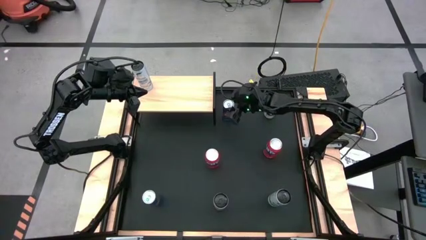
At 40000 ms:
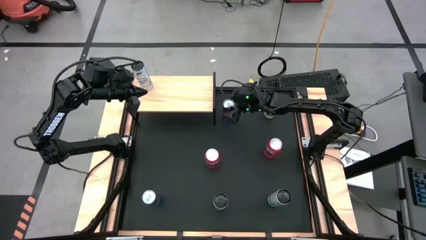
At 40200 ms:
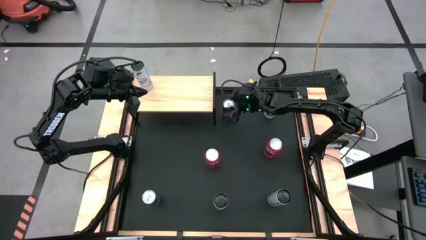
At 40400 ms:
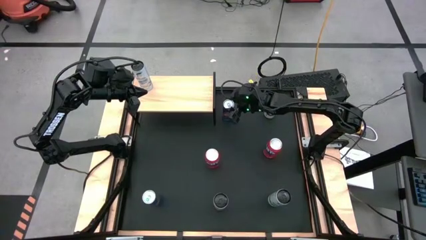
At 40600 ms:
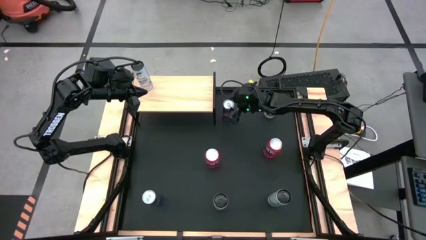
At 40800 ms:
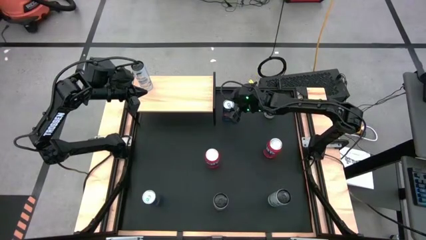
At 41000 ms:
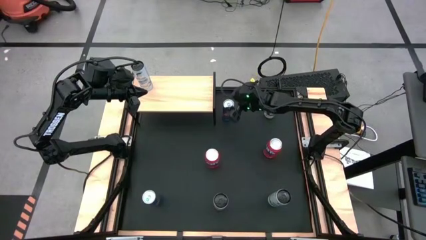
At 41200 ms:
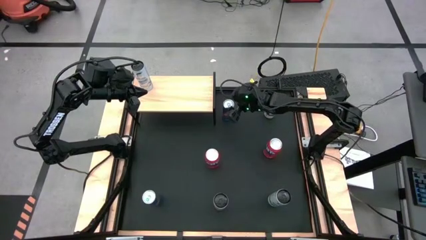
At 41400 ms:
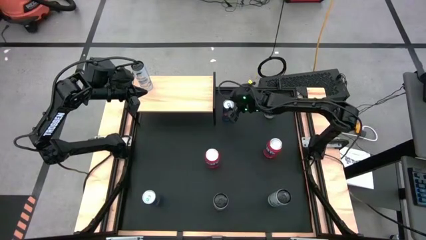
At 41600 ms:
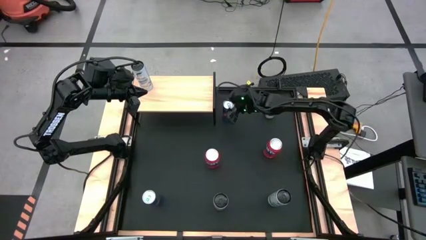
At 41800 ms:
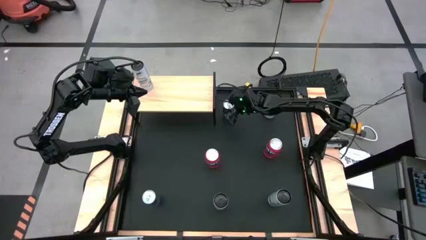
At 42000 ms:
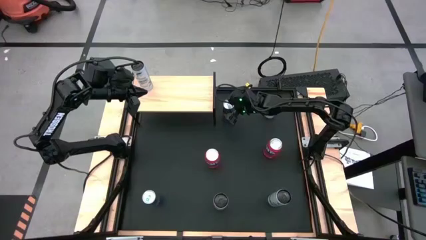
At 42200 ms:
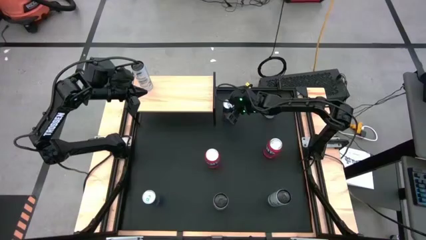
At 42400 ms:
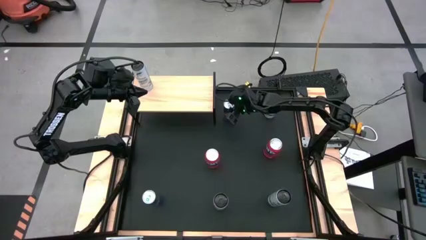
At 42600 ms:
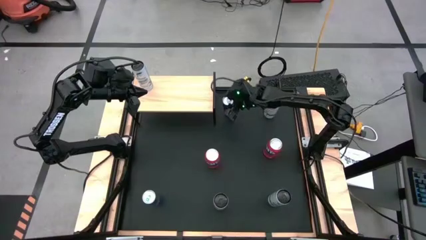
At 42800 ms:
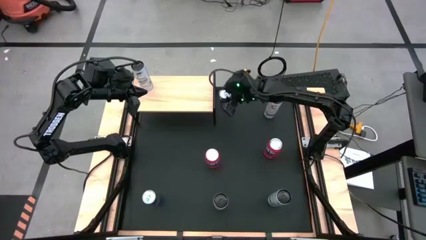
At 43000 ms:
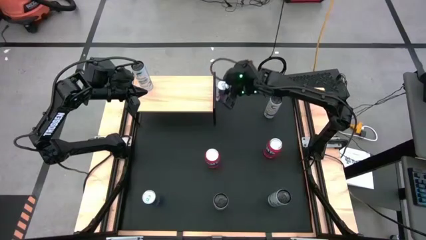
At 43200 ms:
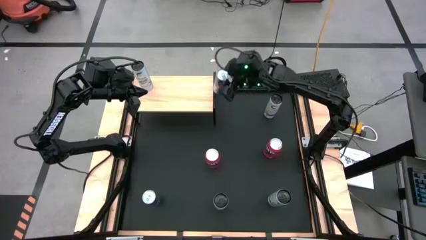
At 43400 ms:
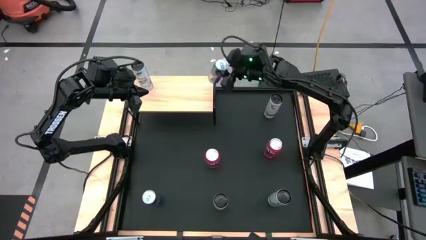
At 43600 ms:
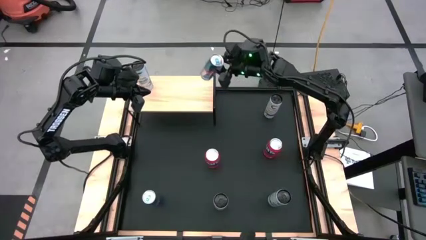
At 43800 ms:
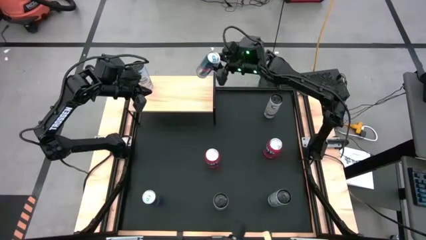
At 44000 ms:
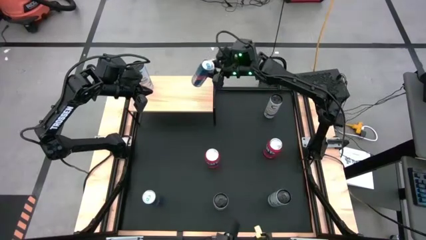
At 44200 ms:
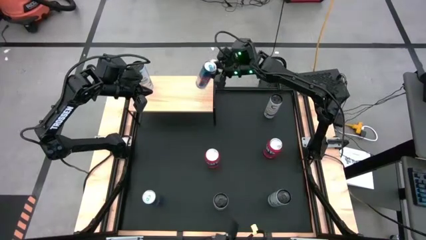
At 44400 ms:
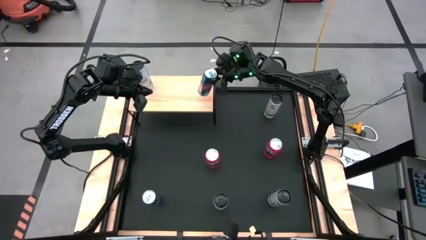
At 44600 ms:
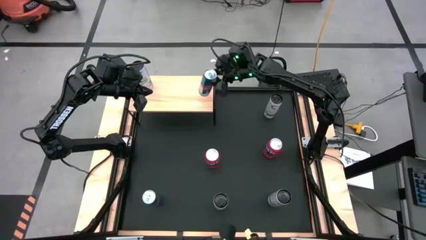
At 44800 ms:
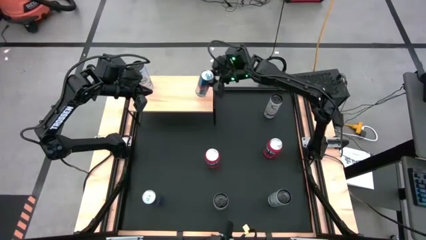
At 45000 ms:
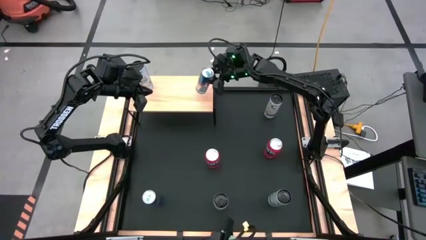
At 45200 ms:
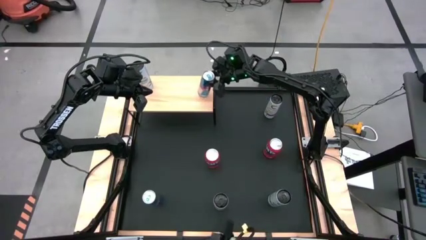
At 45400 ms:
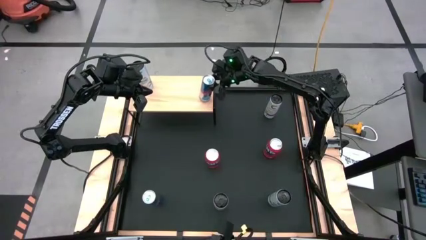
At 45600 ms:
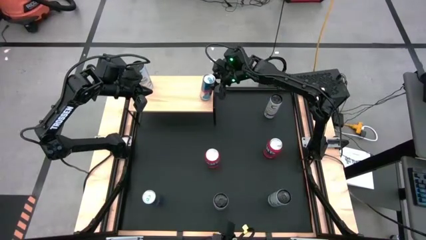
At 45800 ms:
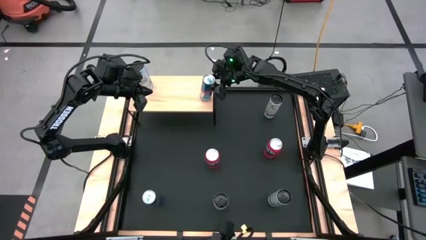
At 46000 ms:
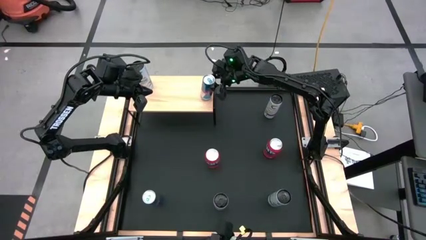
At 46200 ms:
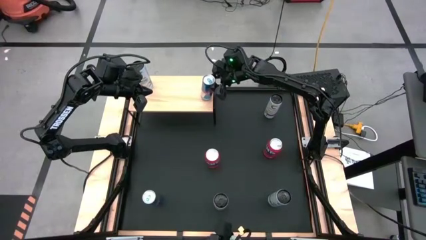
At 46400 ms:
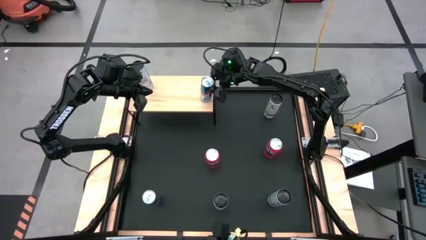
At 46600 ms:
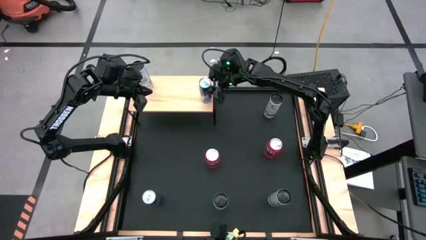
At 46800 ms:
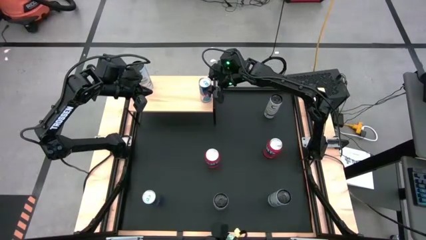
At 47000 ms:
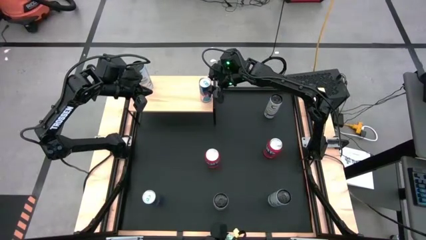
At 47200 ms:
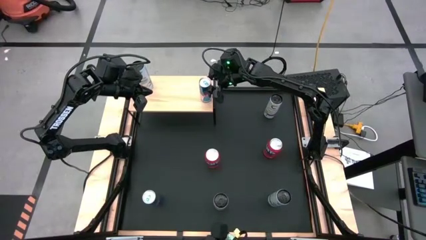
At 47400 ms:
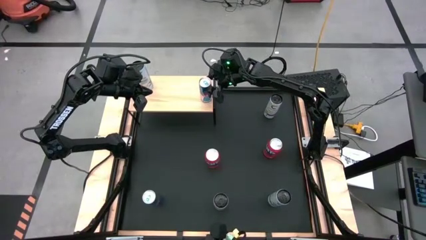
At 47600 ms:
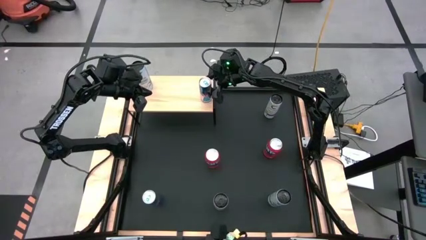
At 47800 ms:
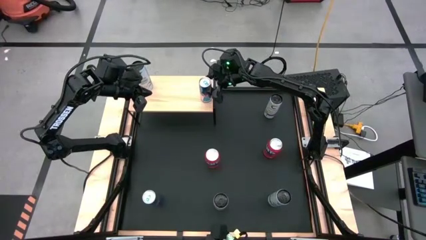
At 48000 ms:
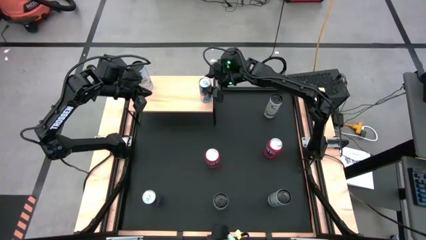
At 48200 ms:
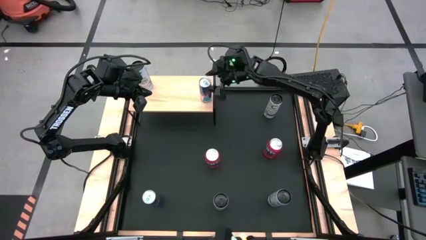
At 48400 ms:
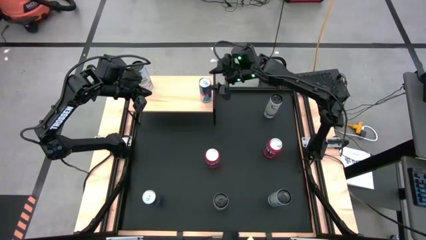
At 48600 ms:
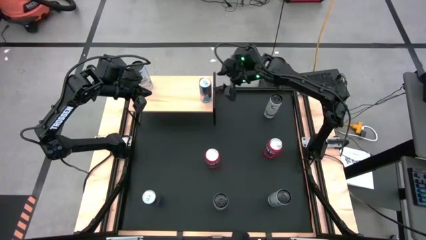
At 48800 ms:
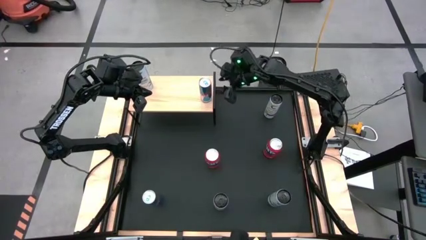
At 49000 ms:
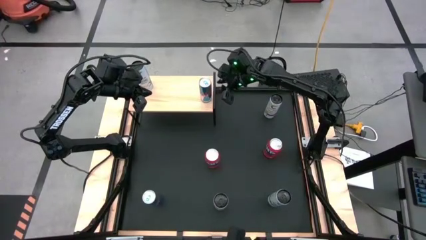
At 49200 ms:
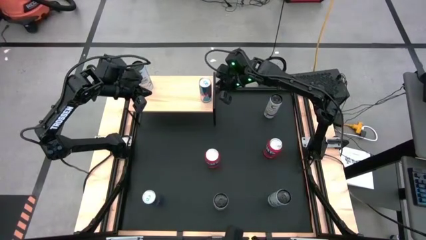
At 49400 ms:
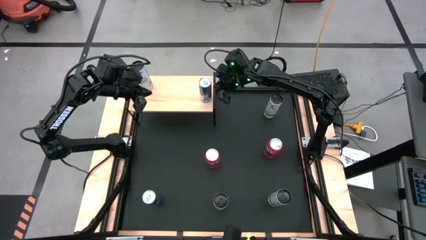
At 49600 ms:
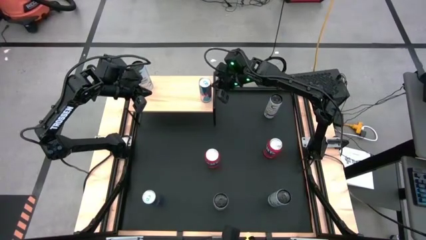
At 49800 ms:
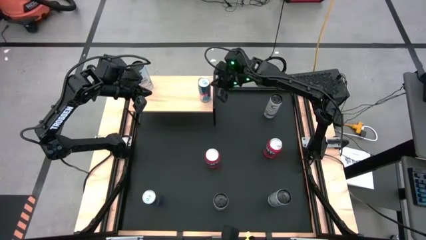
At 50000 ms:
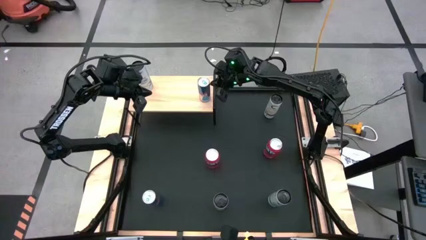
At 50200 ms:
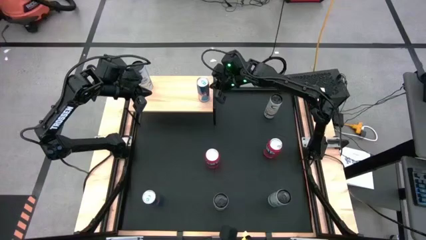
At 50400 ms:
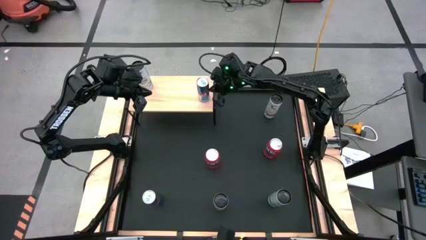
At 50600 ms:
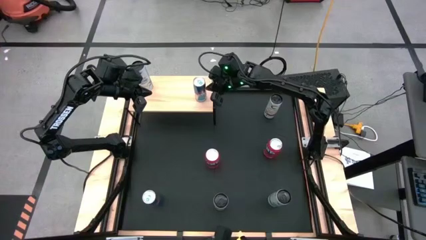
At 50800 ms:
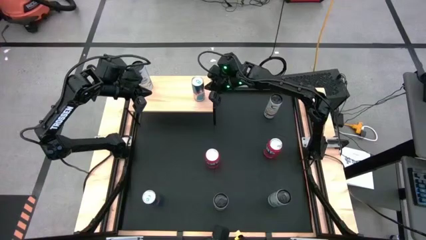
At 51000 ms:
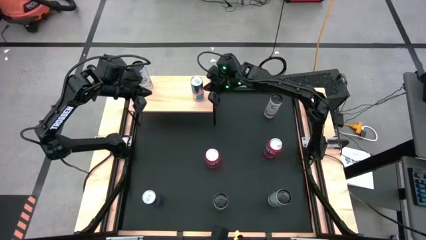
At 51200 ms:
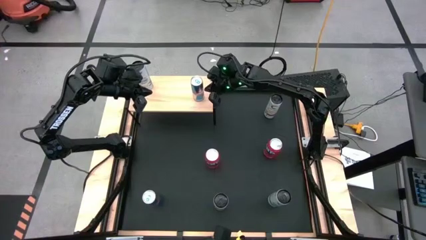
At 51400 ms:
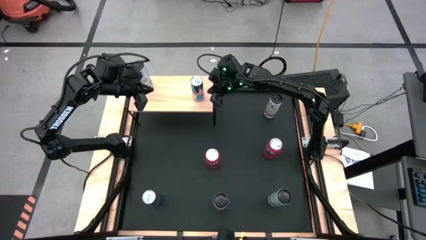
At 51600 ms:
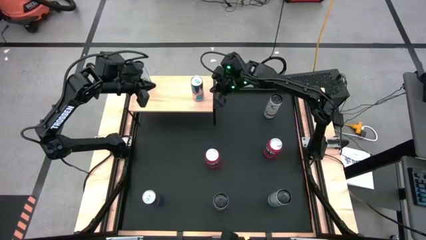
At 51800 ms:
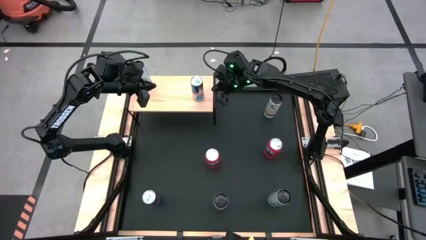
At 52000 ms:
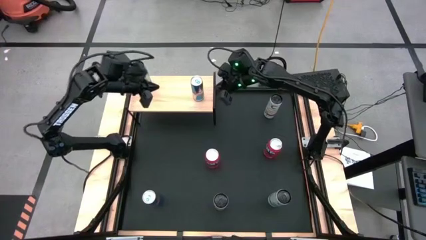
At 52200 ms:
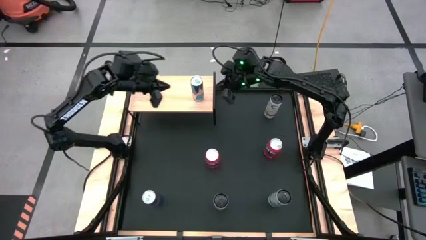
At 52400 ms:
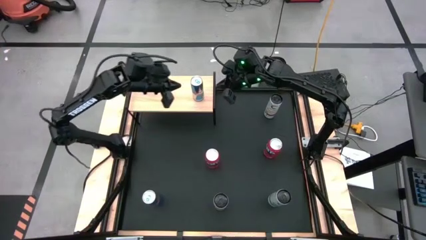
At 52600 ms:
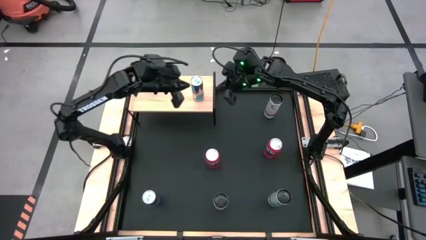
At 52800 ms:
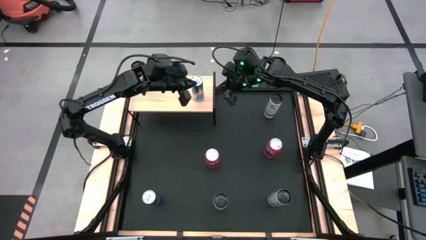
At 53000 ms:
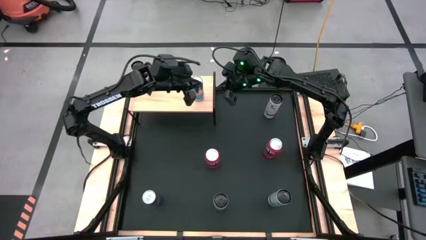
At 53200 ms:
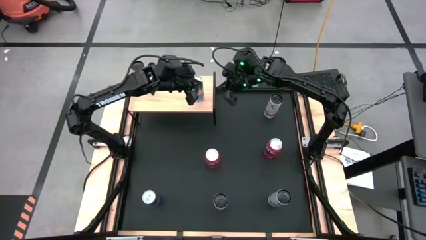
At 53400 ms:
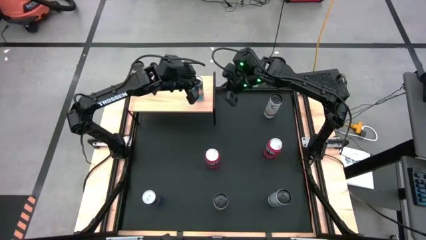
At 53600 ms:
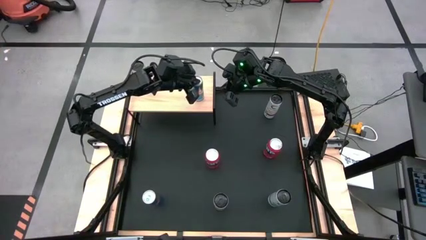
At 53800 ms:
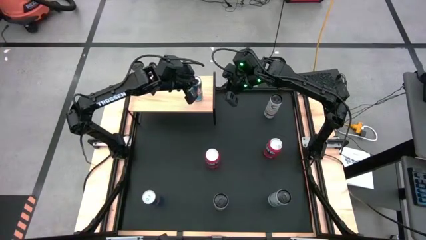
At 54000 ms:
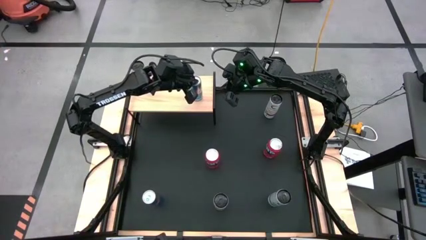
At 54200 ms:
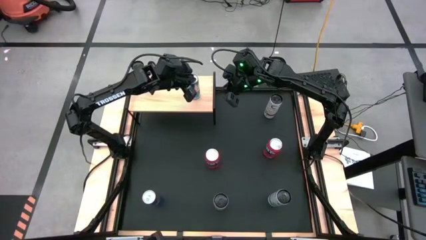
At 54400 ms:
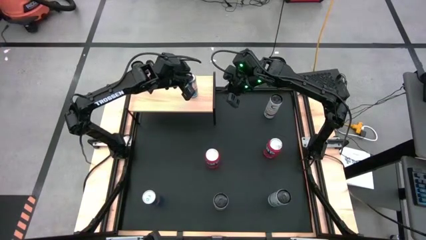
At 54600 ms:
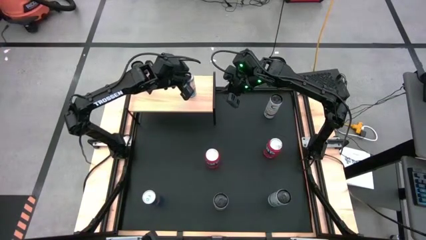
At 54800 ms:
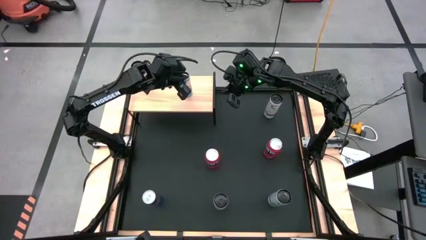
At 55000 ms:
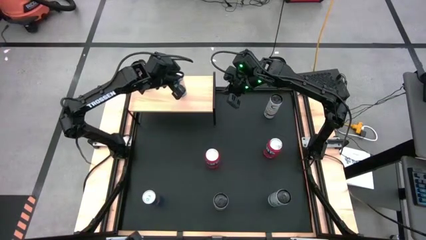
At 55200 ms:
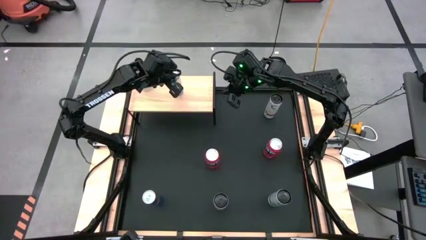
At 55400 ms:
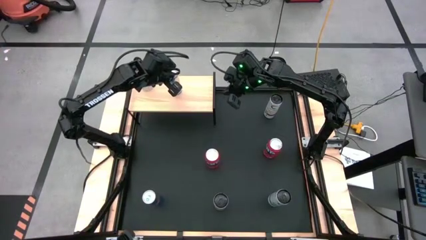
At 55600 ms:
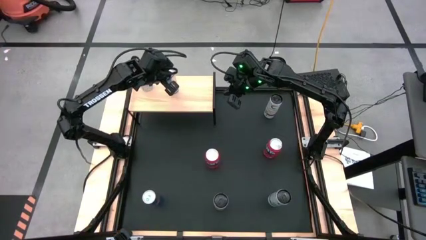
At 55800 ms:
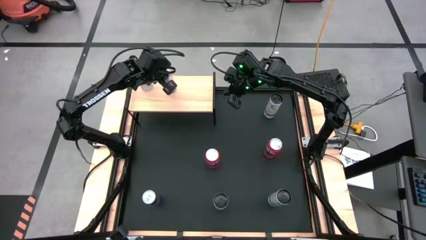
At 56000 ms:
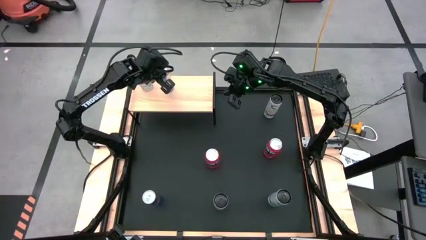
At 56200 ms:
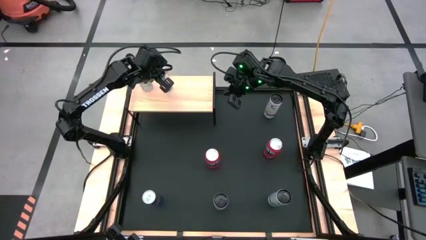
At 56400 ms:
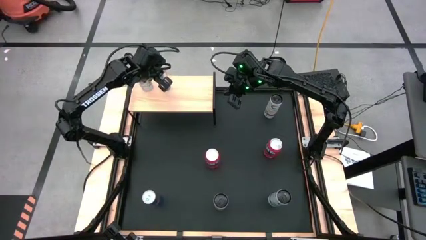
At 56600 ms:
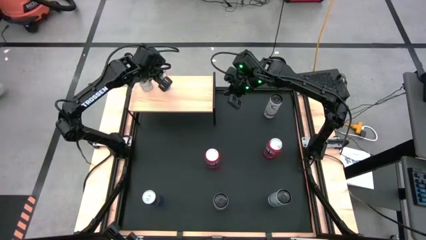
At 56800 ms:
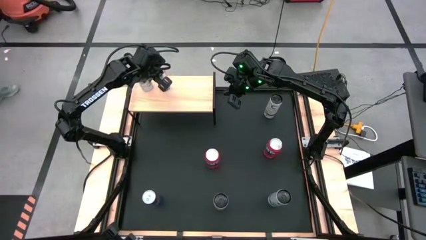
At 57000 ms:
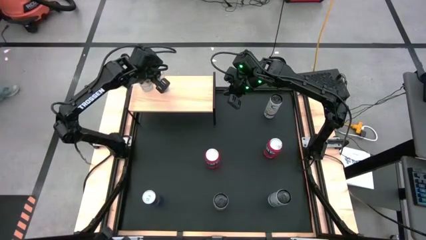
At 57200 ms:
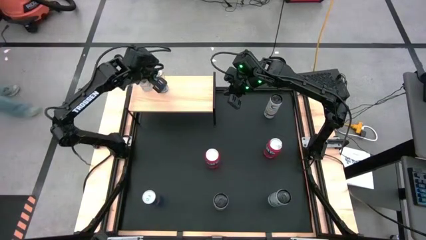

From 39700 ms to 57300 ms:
Task: Place canned beverage on shelf
Put the top blue soda can on the shelf
